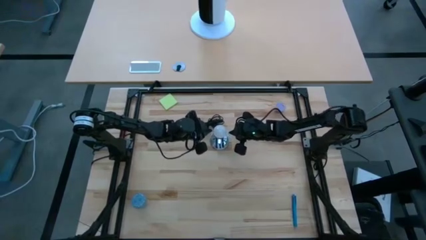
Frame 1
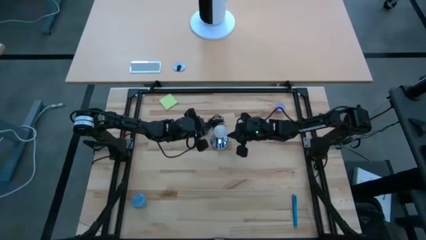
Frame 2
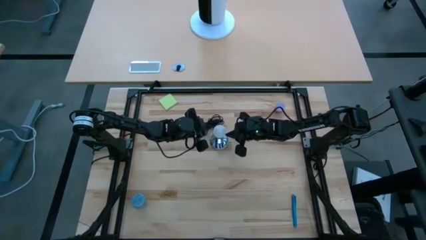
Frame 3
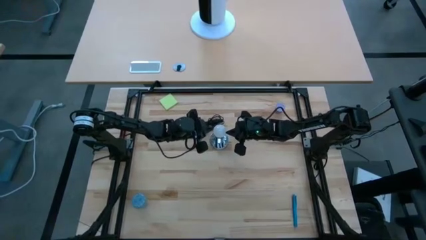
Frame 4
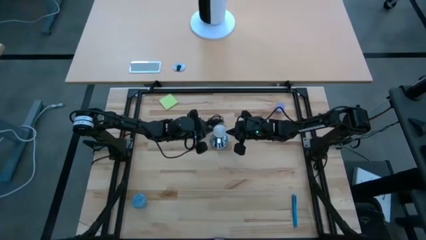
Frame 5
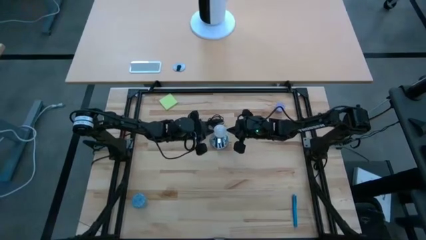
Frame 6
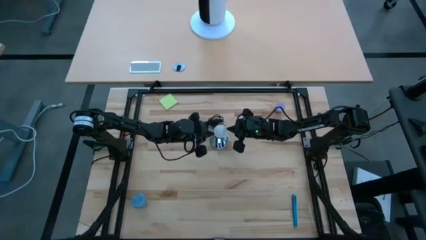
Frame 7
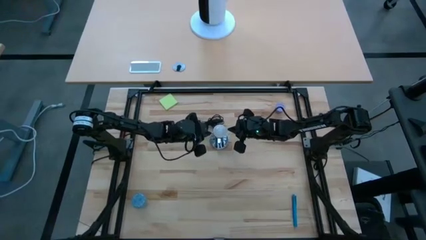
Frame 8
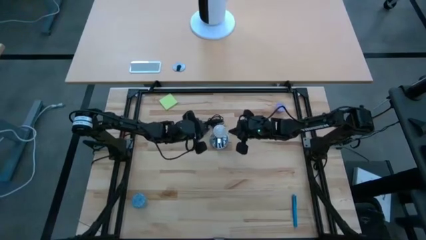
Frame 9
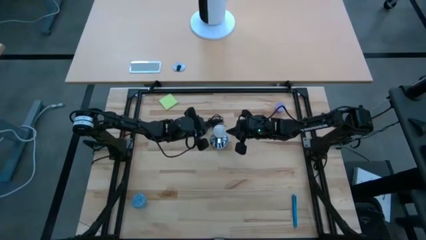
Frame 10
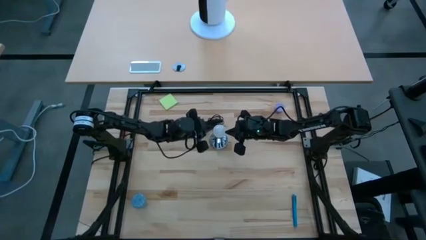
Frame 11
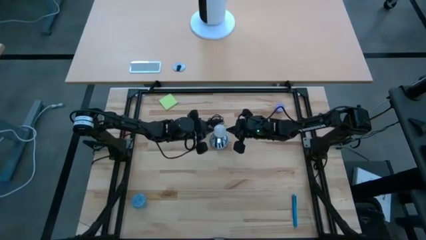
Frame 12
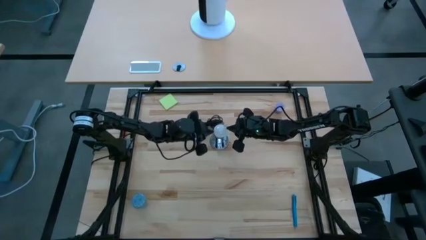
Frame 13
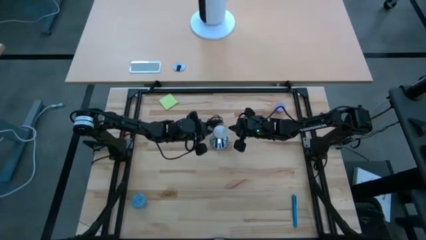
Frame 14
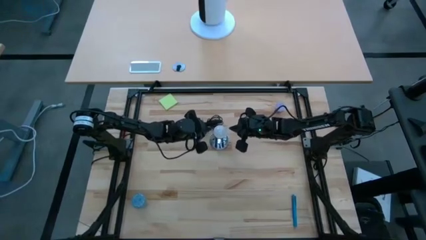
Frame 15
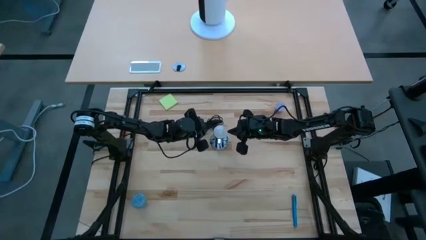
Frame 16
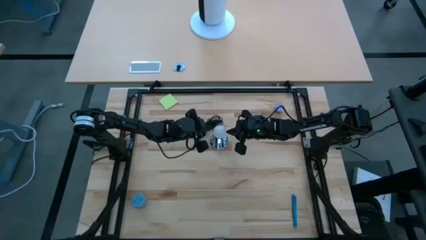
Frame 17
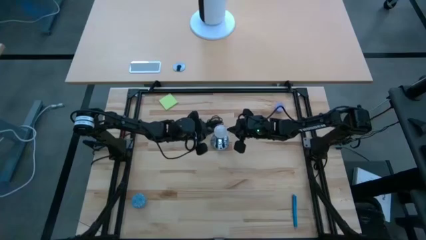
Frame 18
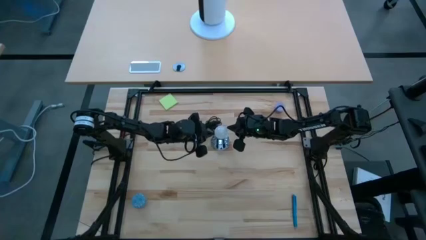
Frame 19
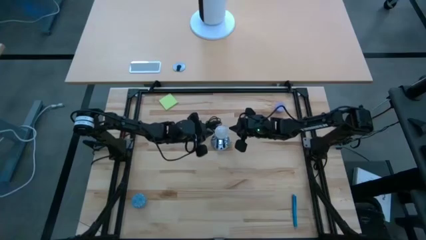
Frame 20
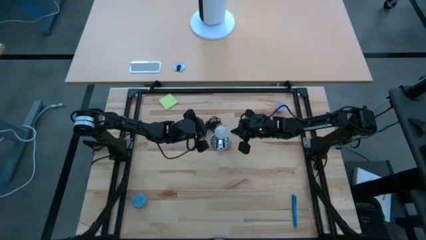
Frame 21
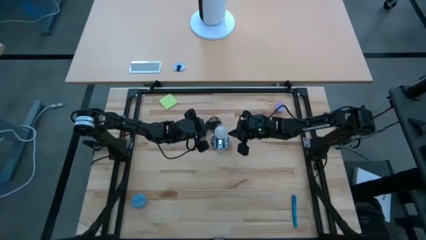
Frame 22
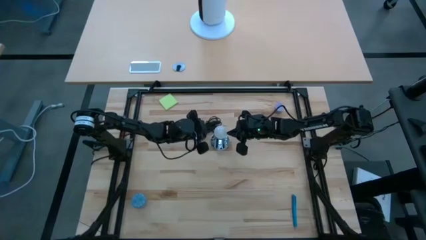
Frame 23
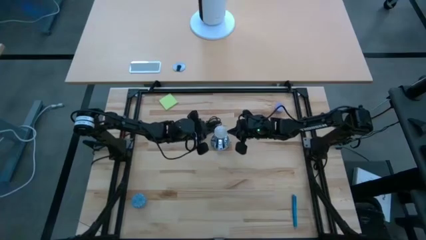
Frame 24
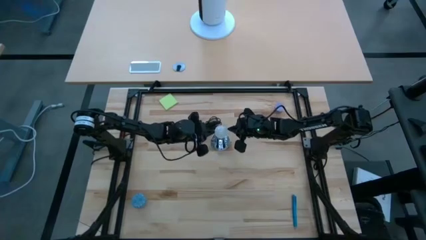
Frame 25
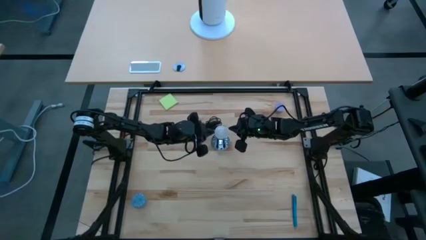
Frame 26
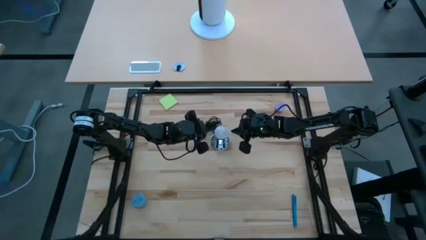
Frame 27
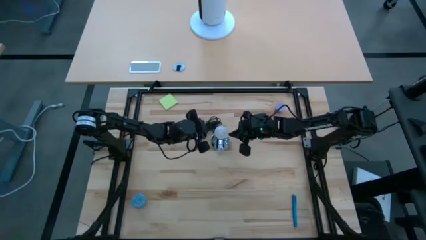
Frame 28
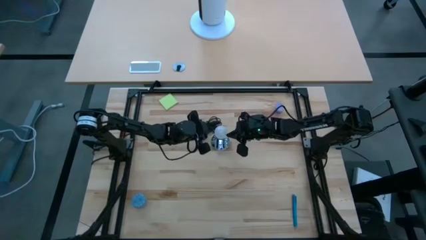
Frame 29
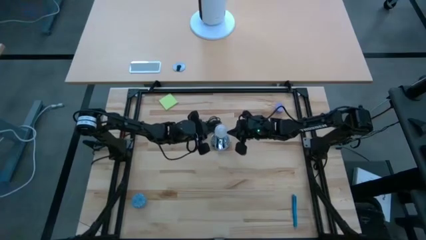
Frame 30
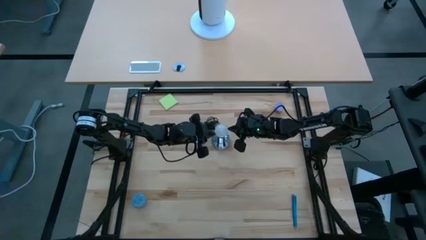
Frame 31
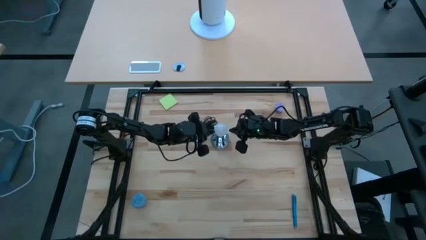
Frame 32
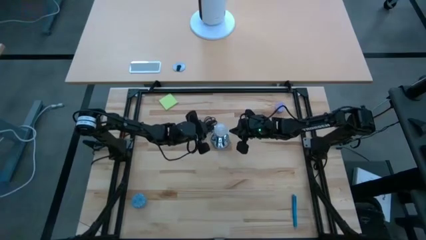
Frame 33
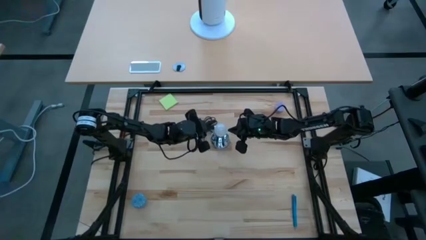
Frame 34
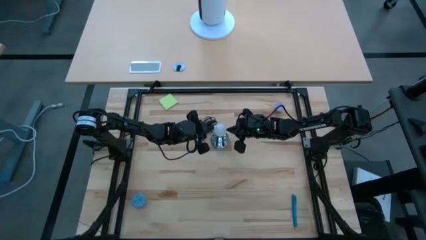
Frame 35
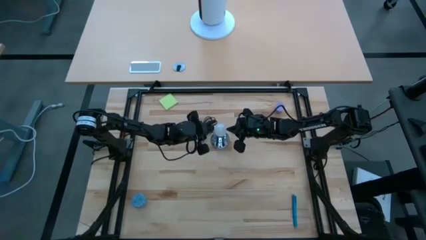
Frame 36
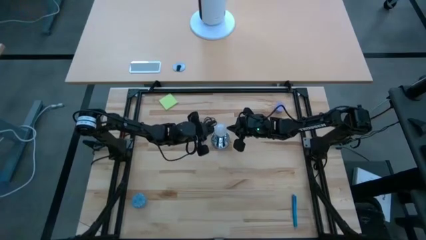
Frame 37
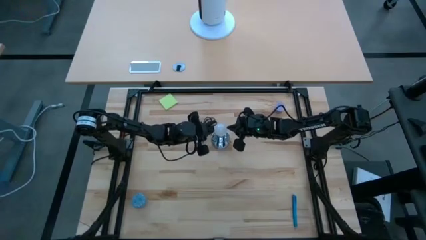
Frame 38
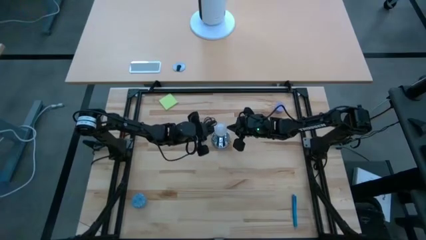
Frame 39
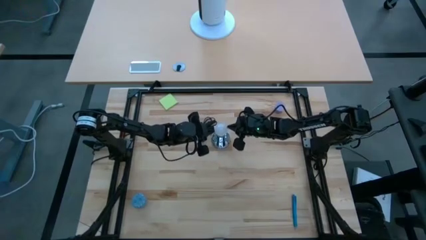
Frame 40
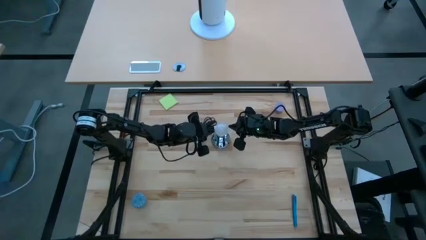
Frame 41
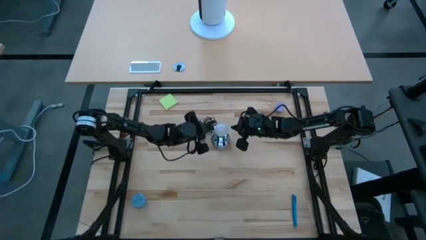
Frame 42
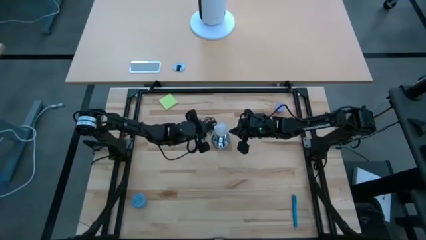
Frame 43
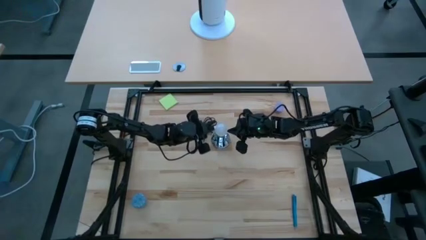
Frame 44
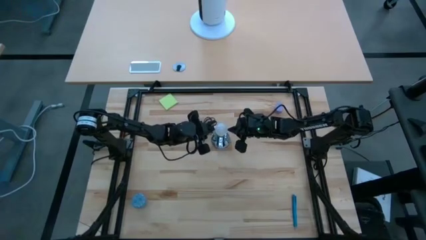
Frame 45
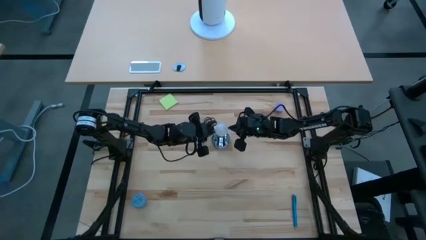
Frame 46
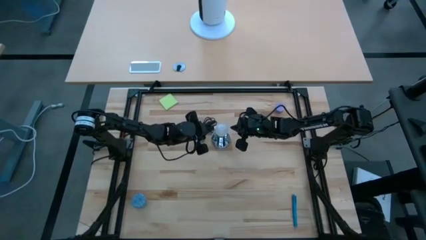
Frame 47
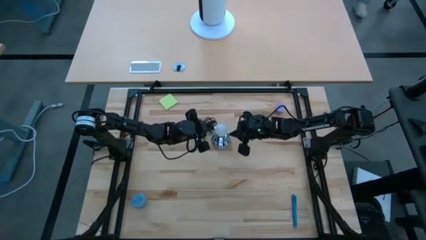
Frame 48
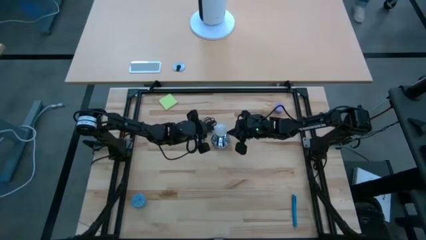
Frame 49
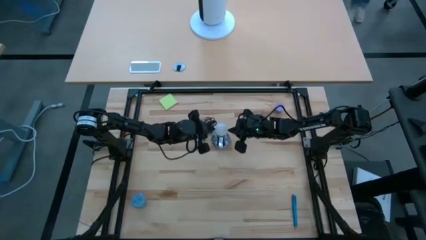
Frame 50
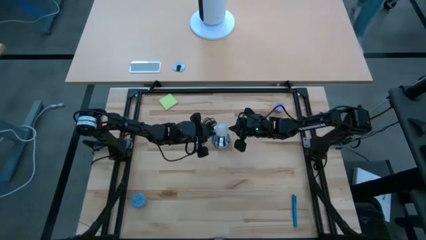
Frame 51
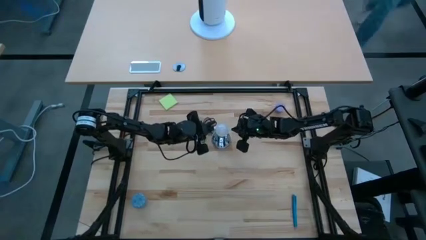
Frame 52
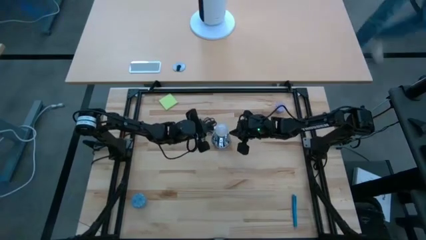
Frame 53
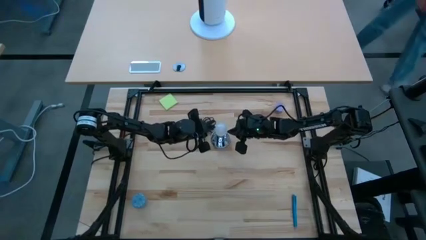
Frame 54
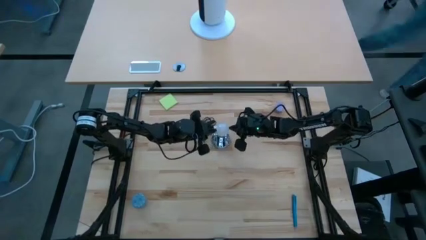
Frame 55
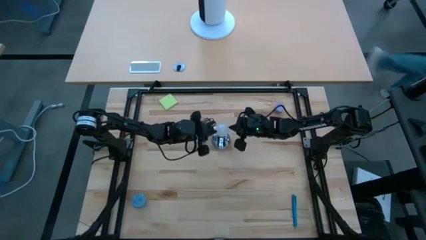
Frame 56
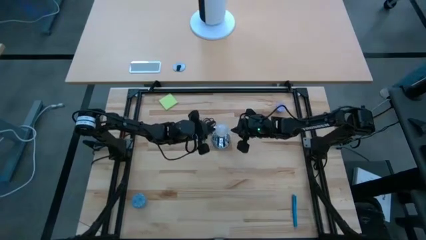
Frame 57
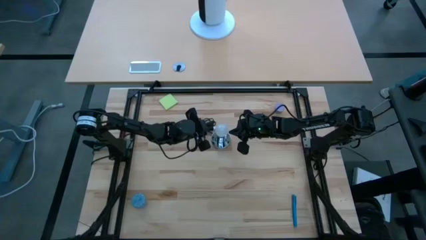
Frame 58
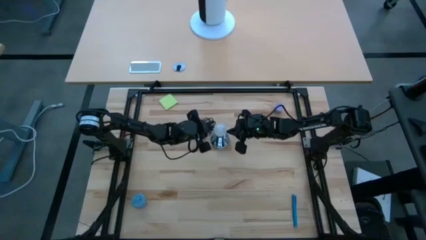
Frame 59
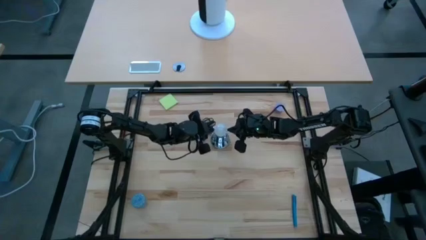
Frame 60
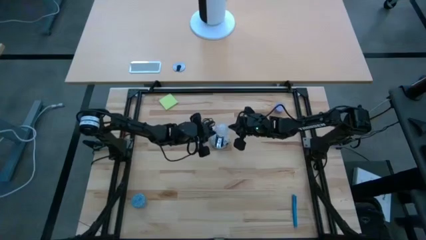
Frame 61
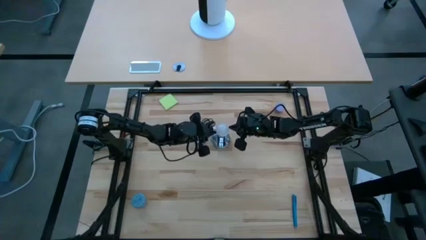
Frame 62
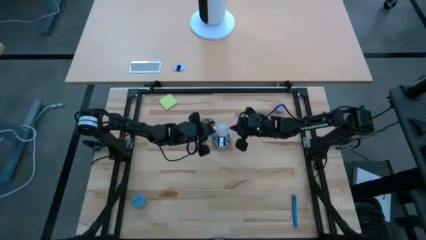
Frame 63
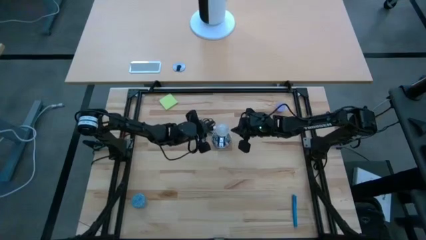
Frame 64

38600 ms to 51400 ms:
Task: Screw lightbulb
Remove the white lightbulb from the silver lamp
